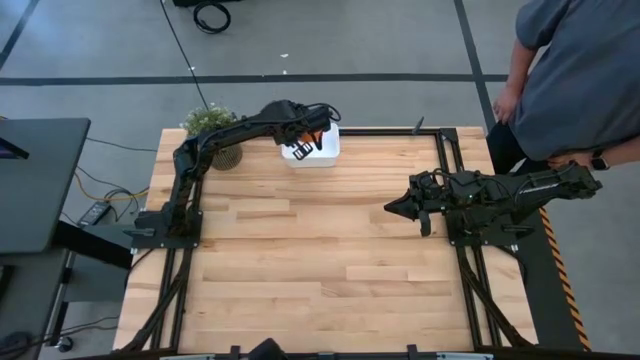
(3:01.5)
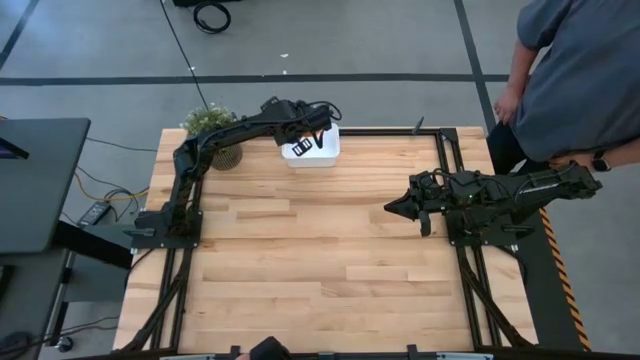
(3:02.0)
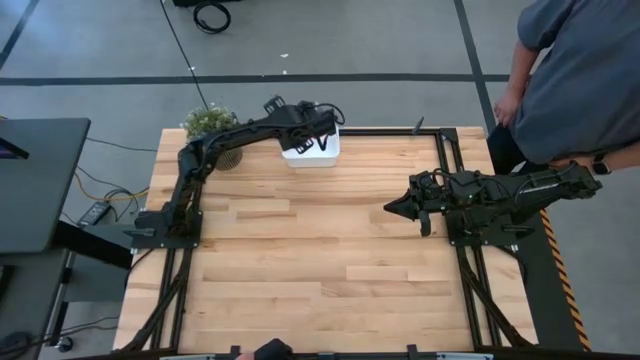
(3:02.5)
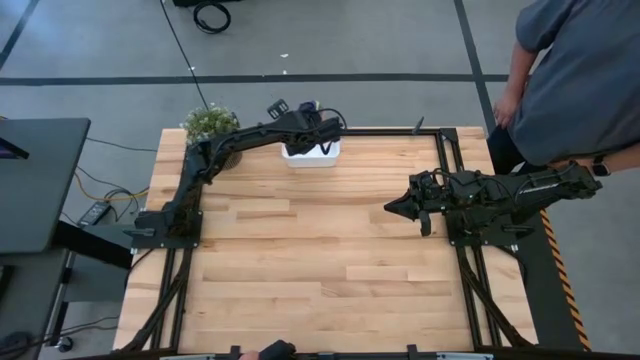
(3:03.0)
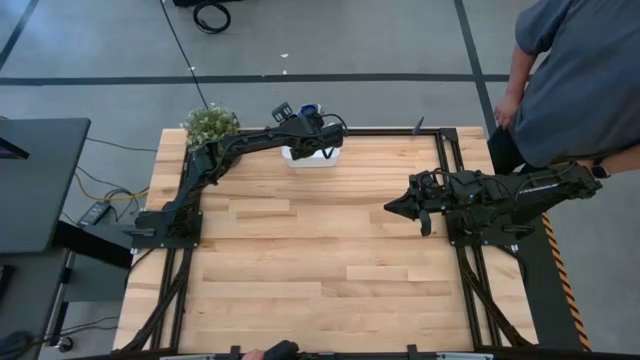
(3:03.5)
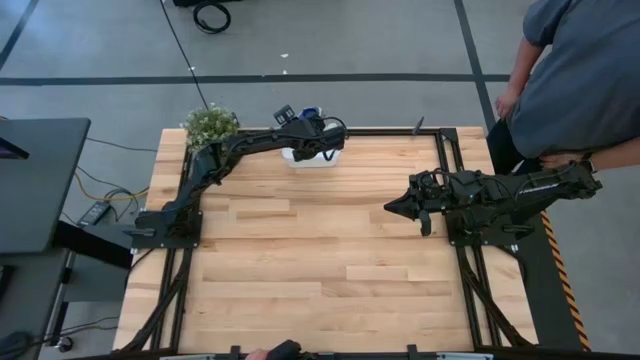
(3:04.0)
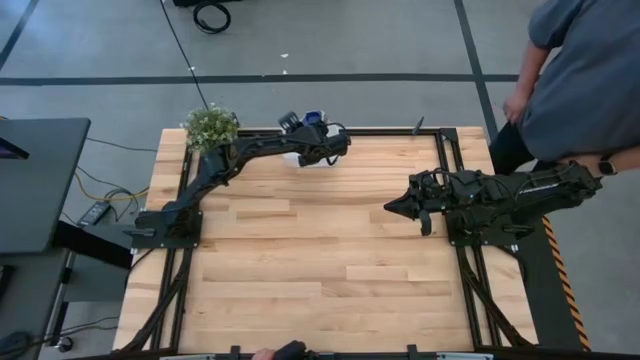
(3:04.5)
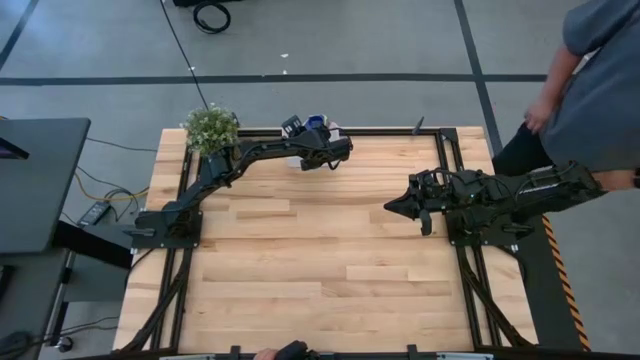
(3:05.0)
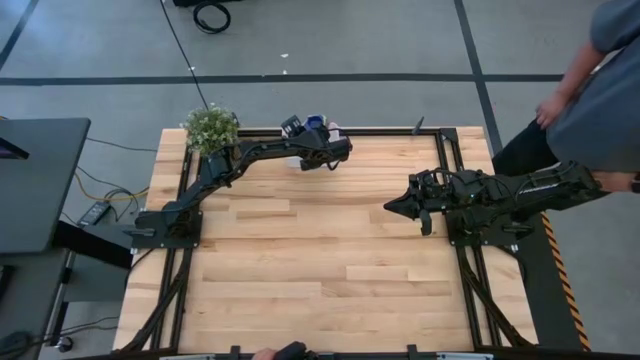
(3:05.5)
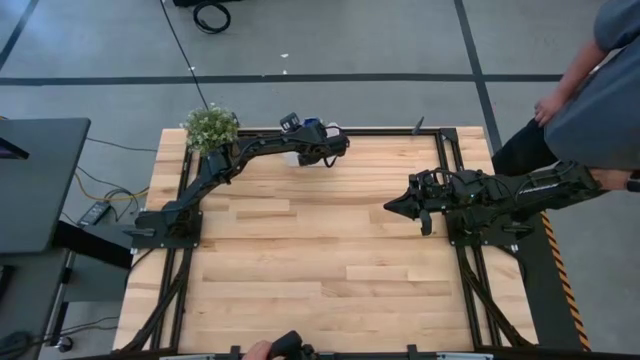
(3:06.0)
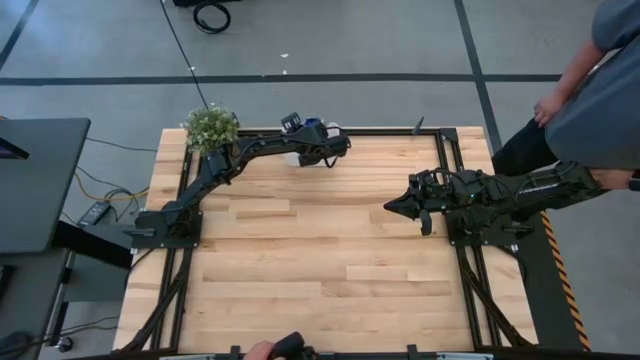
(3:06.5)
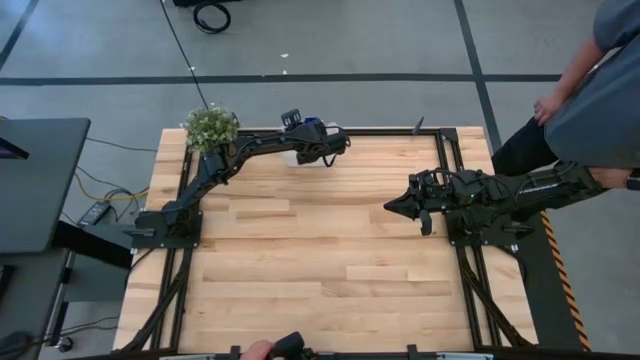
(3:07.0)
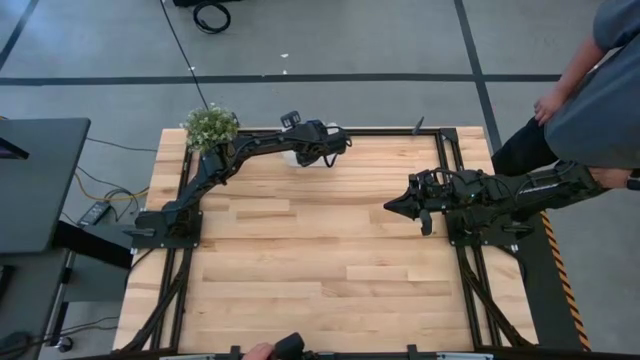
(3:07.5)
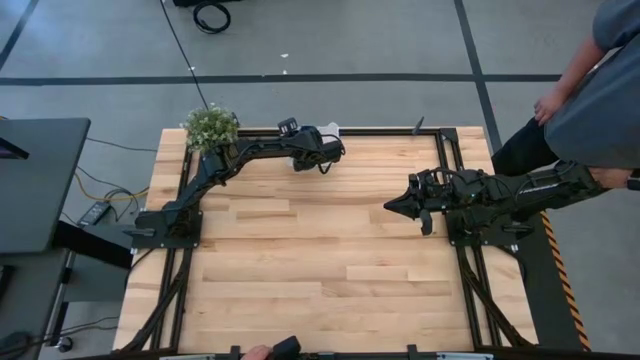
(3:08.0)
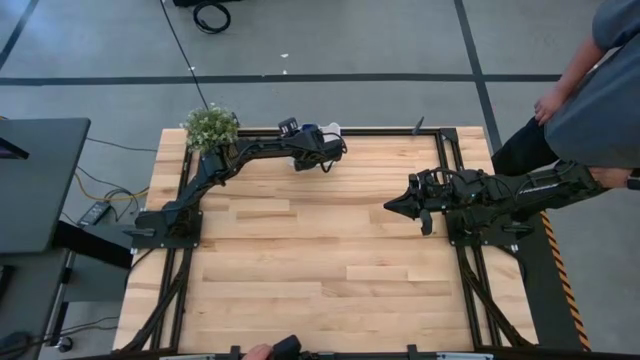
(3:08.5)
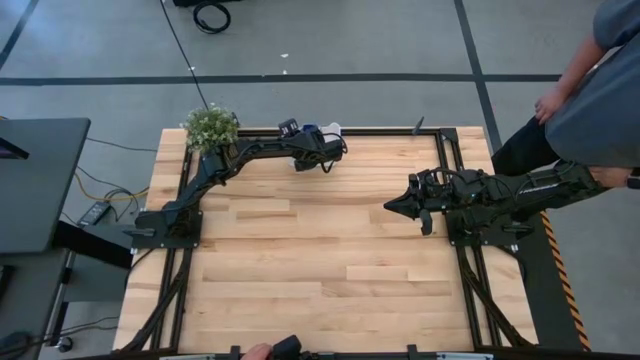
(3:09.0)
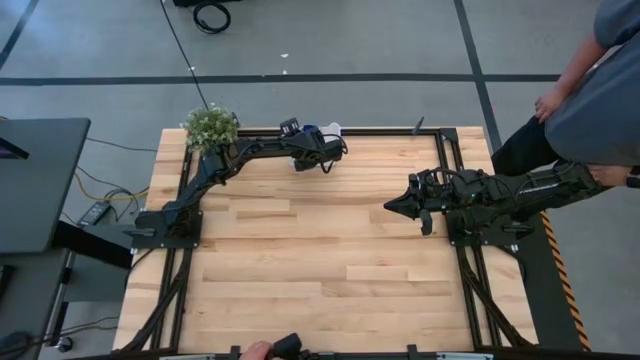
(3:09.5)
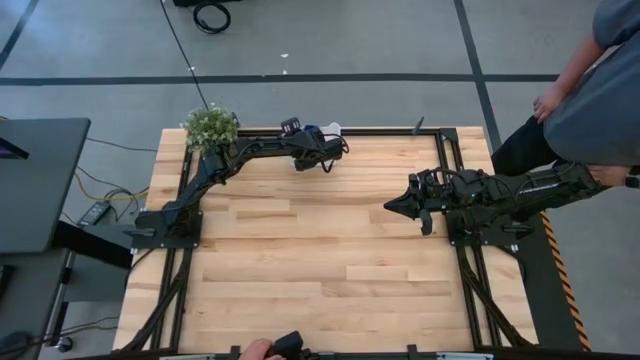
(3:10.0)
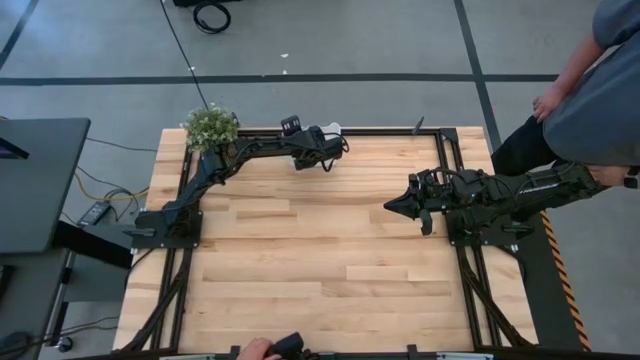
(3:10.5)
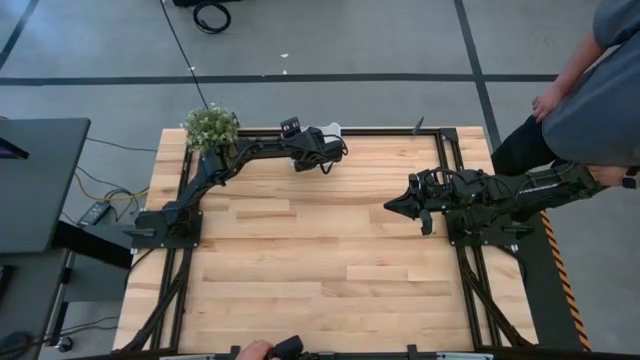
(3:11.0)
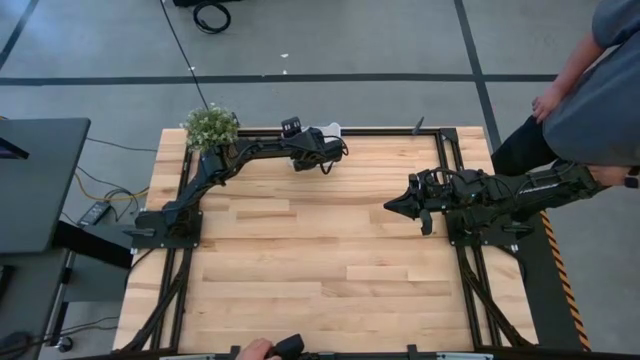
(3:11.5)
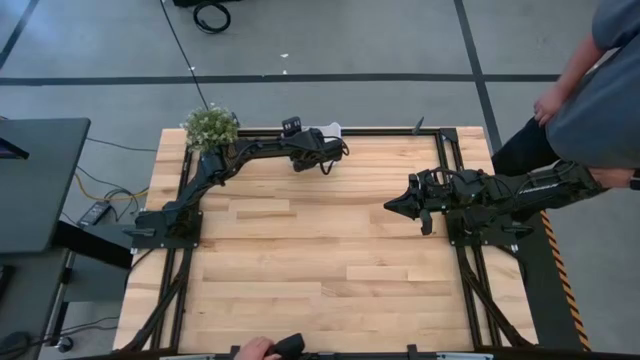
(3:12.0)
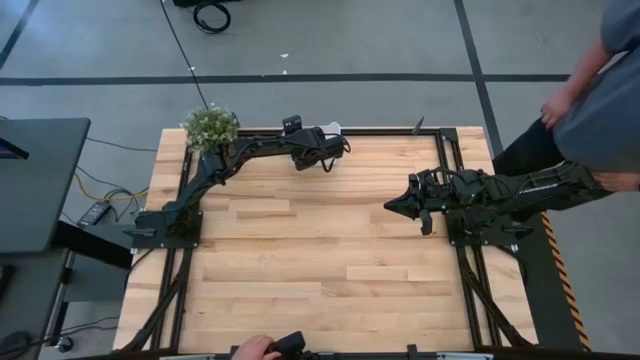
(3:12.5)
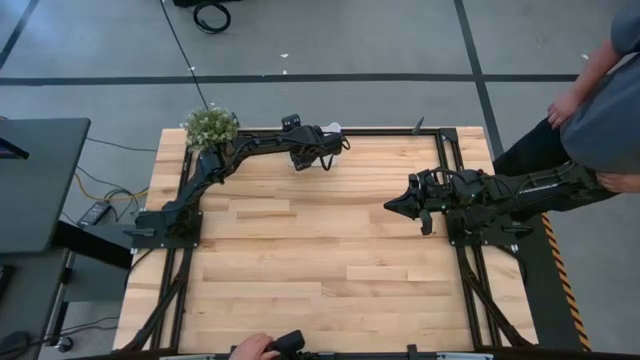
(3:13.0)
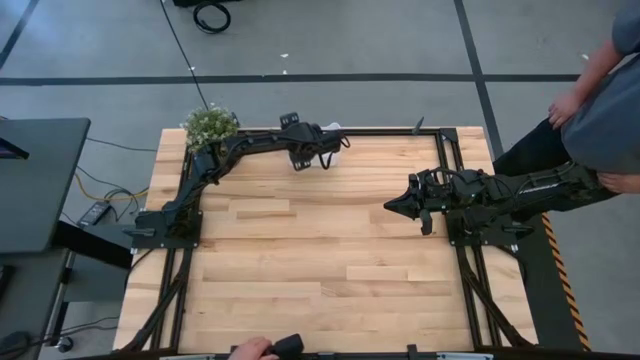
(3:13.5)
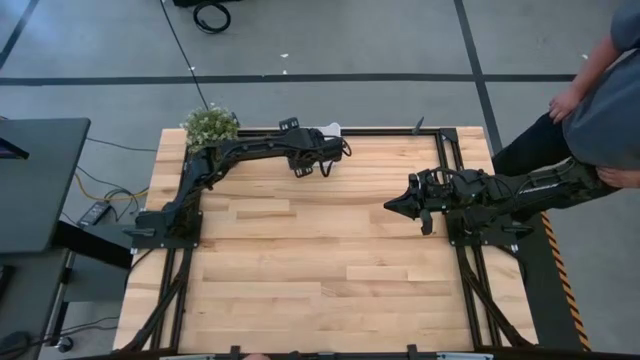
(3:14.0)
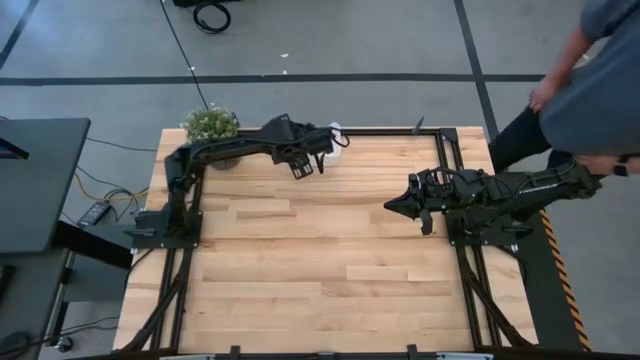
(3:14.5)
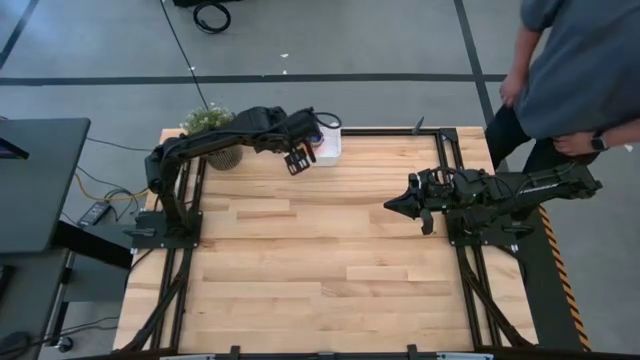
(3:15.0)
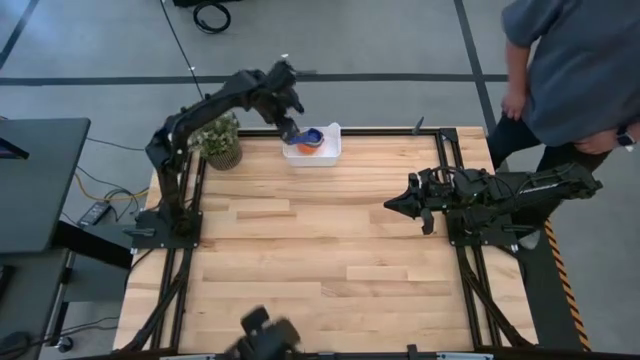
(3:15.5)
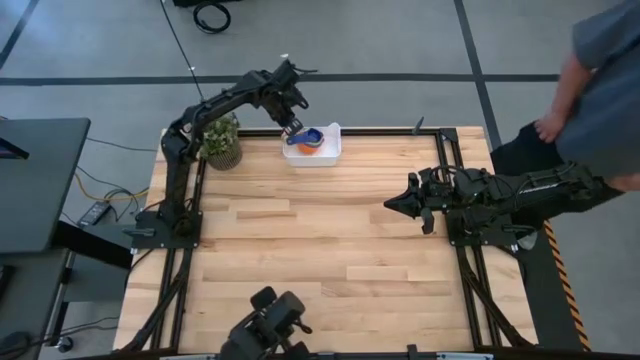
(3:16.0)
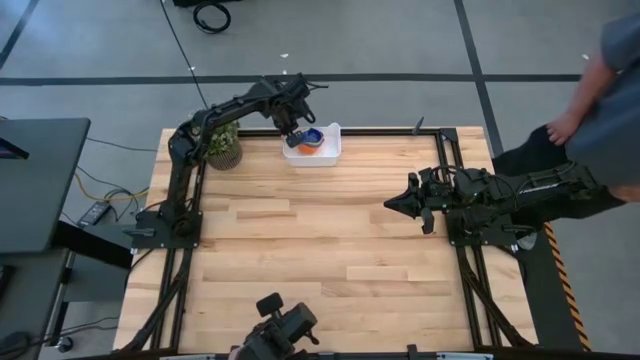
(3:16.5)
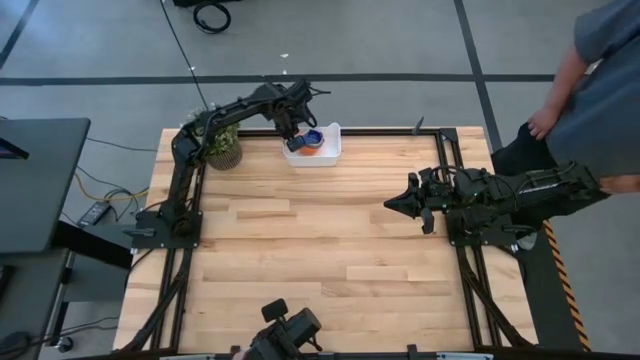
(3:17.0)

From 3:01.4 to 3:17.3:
Task: Nest measuring cups in basket
Put the nested measuring cups into the white bin

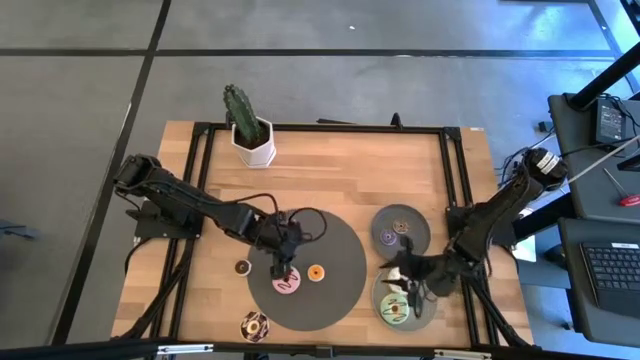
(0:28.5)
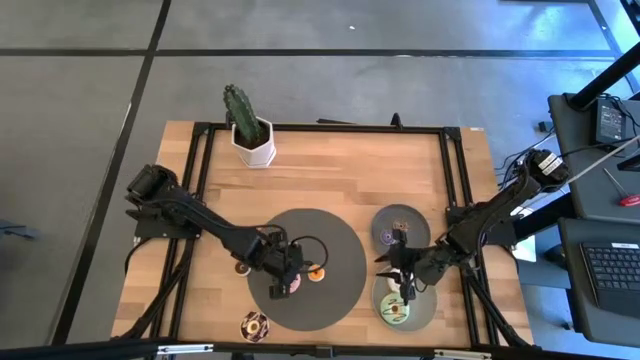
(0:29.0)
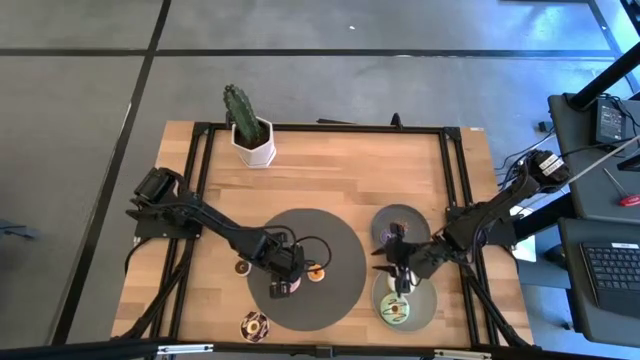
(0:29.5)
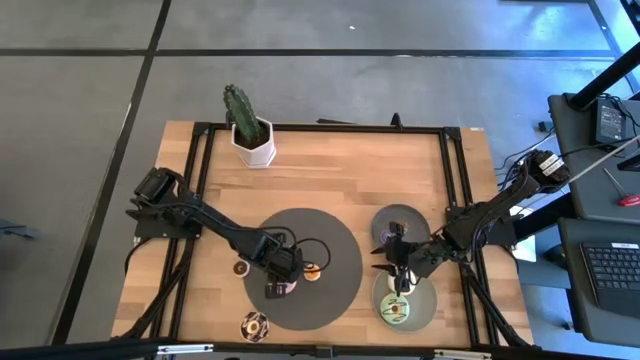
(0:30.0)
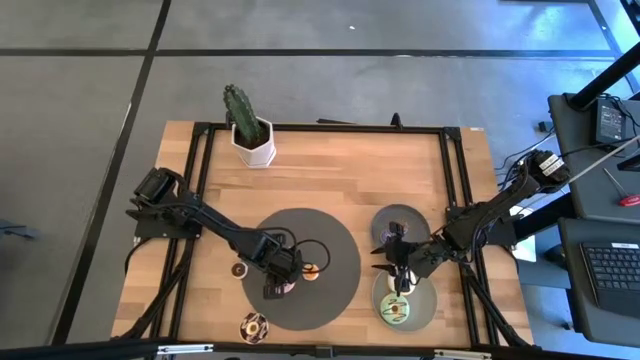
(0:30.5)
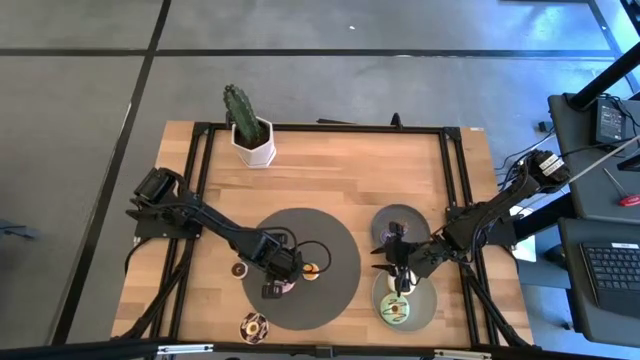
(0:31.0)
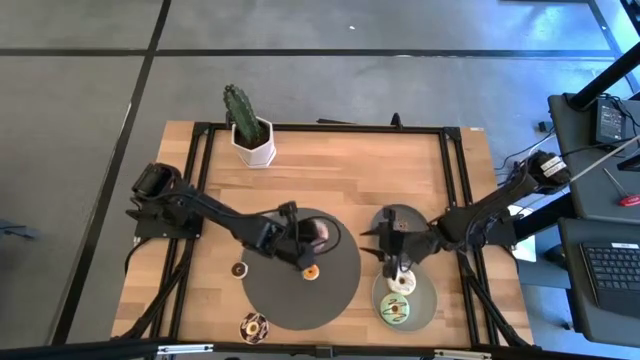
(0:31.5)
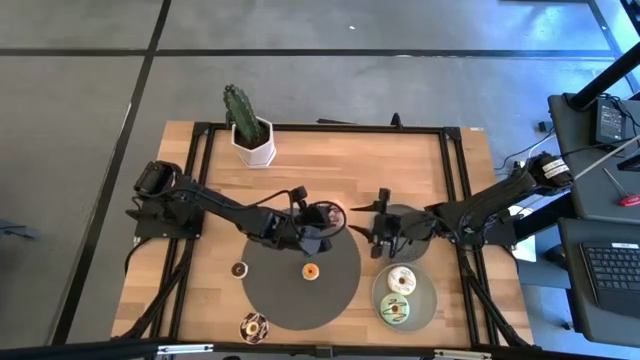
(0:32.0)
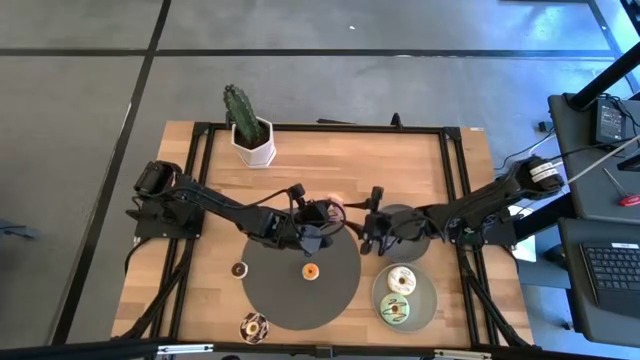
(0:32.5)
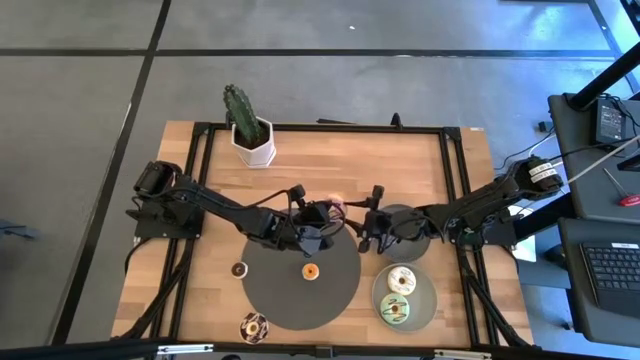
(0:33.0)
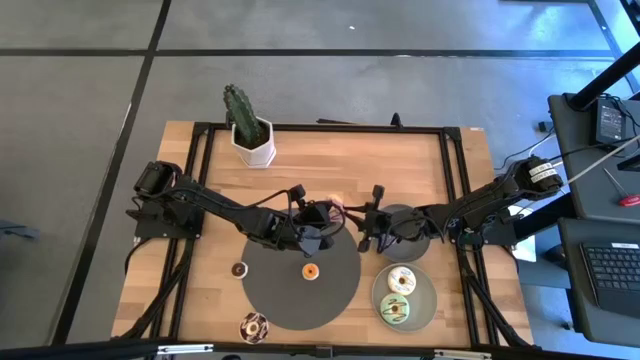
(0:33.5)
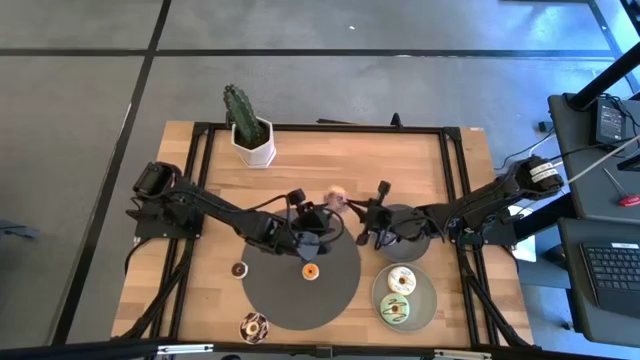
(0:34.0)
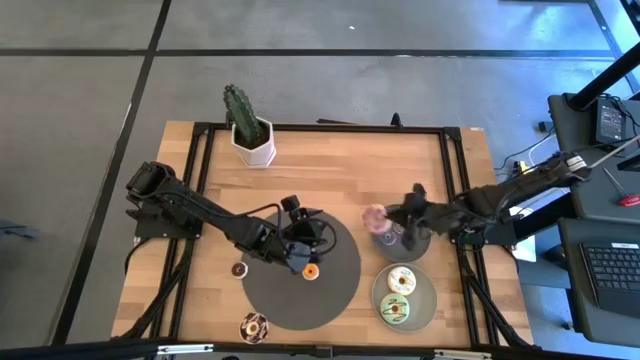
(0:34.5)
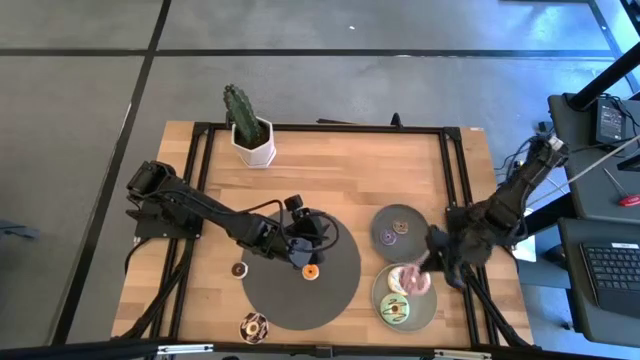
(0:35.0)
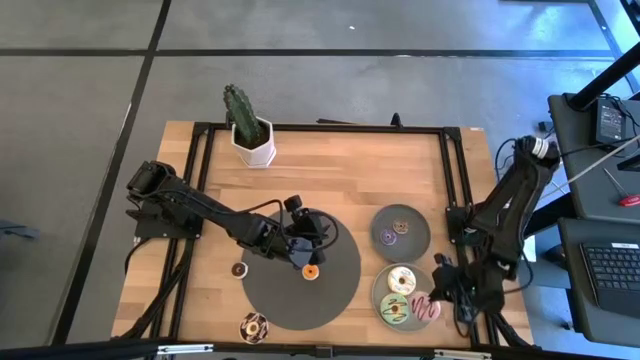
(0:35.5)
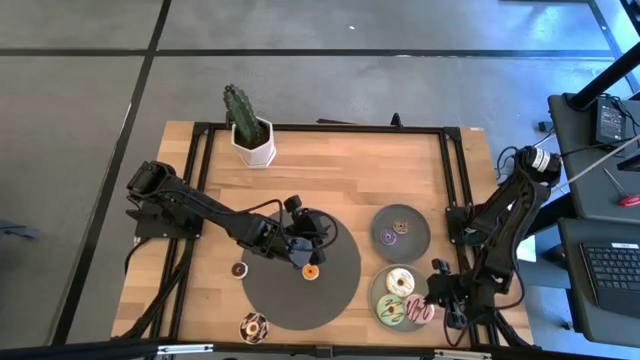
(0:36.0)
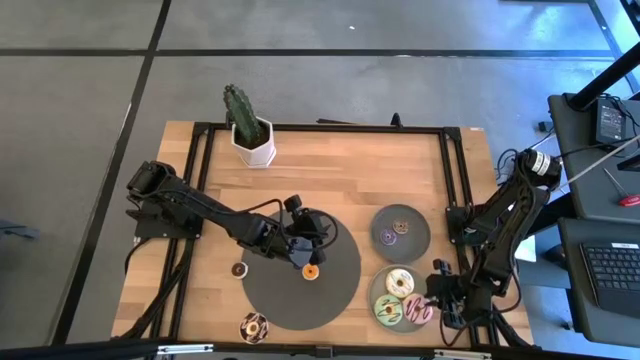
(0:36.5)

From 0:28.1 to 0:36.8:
Task: Pick & Place donuts
Put the large pink donut on the light gray plate
